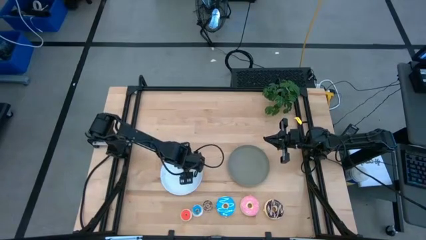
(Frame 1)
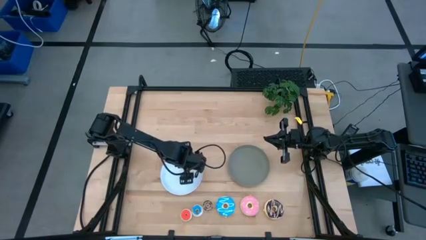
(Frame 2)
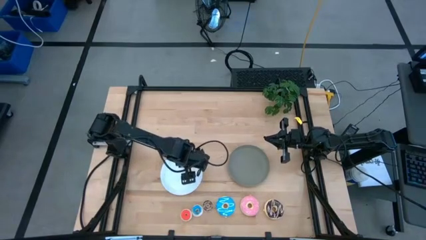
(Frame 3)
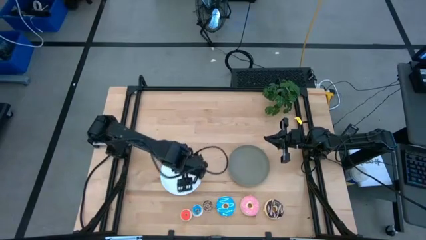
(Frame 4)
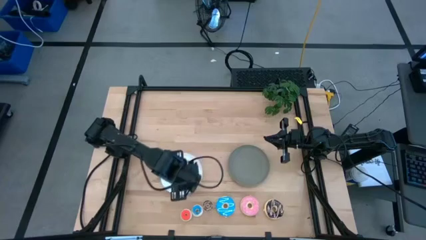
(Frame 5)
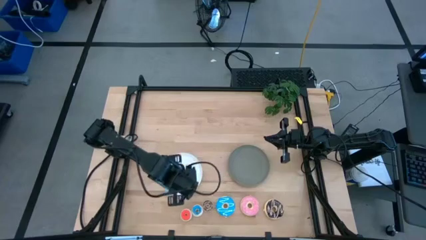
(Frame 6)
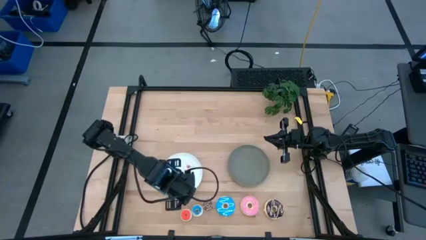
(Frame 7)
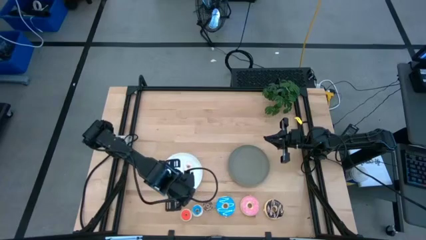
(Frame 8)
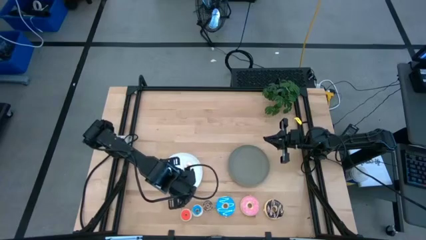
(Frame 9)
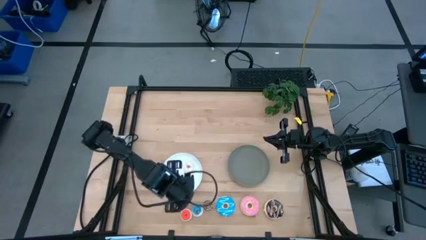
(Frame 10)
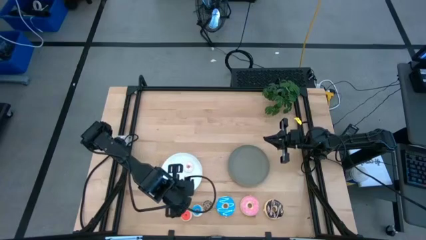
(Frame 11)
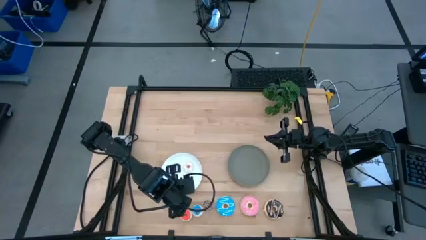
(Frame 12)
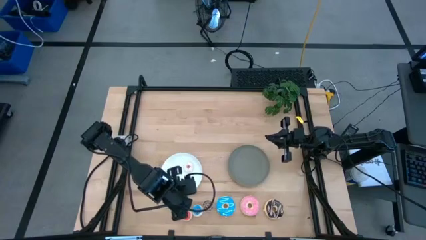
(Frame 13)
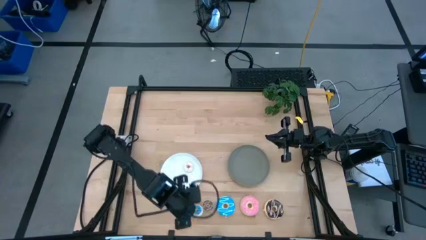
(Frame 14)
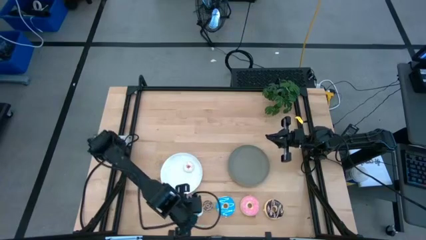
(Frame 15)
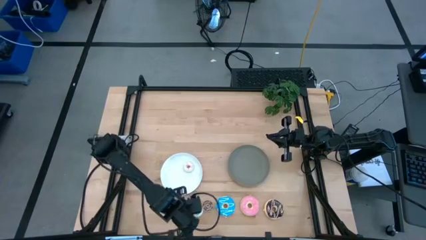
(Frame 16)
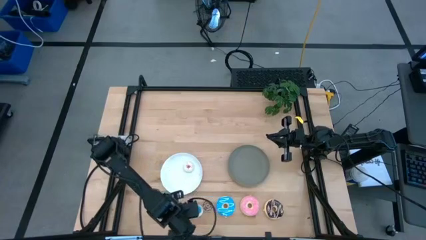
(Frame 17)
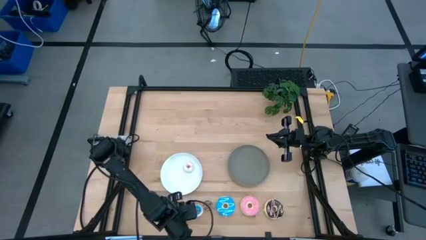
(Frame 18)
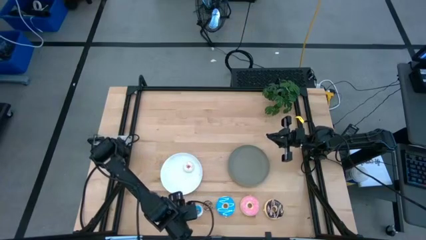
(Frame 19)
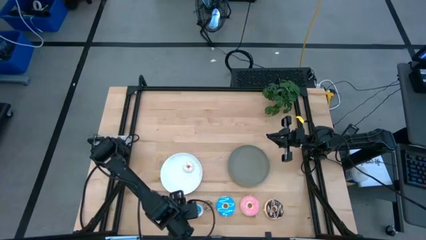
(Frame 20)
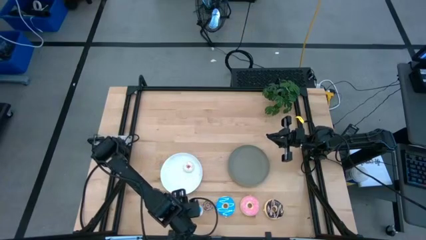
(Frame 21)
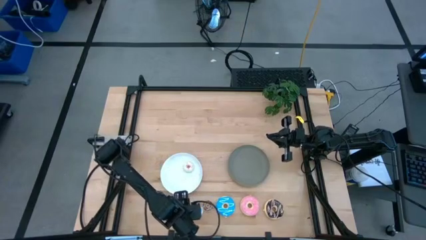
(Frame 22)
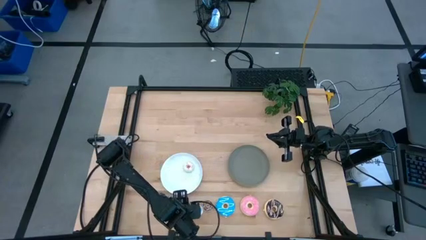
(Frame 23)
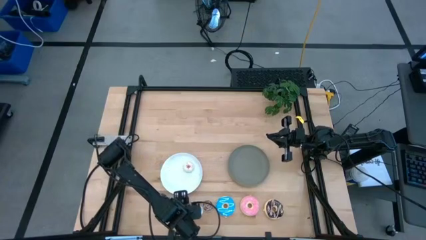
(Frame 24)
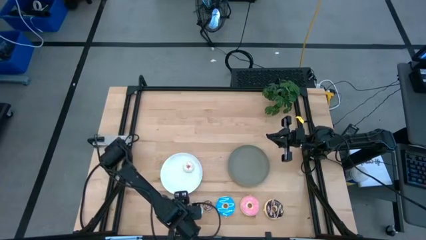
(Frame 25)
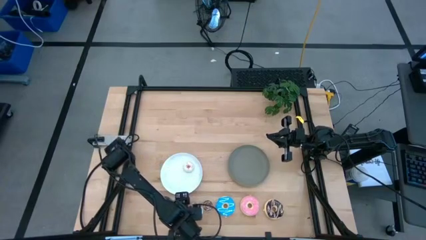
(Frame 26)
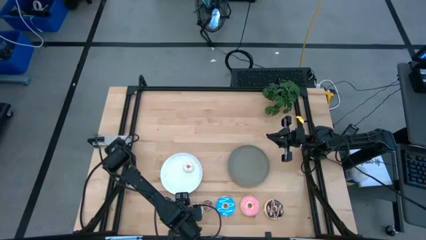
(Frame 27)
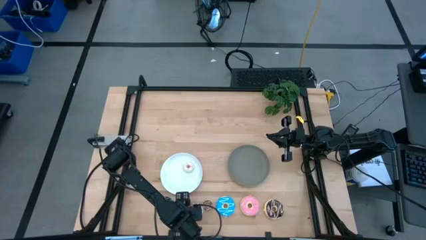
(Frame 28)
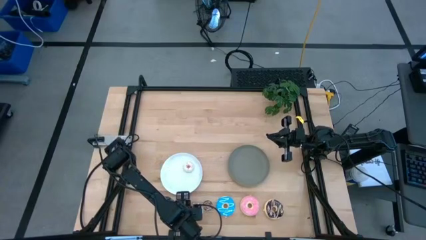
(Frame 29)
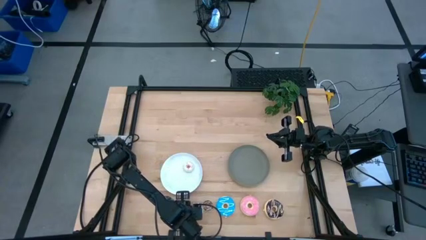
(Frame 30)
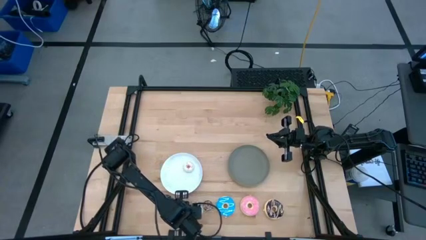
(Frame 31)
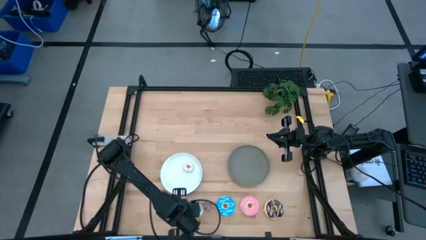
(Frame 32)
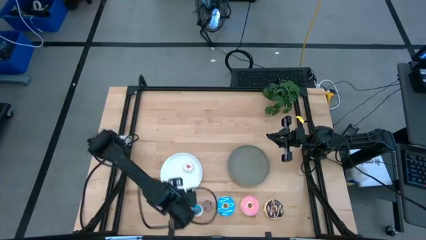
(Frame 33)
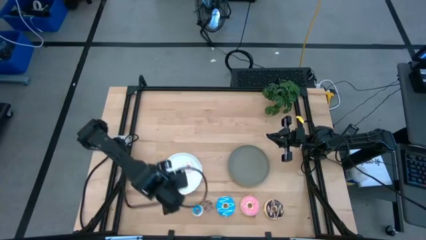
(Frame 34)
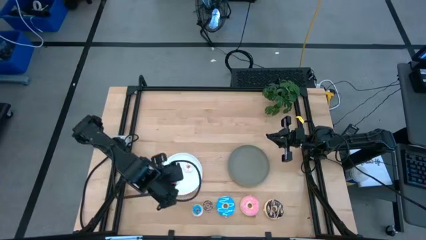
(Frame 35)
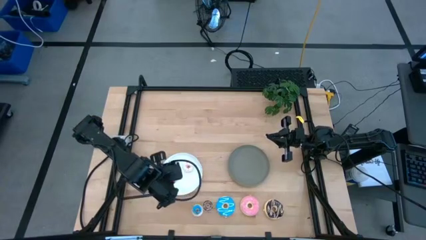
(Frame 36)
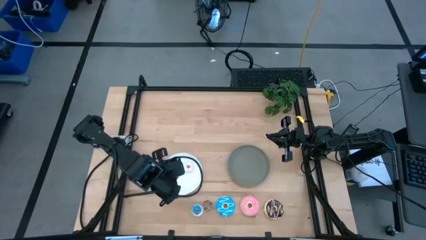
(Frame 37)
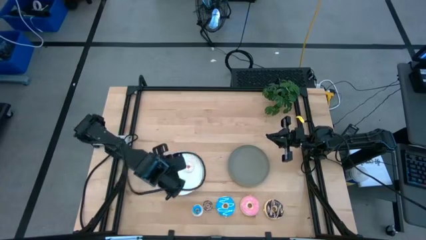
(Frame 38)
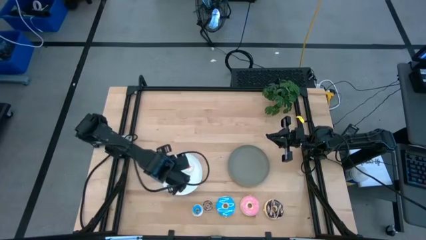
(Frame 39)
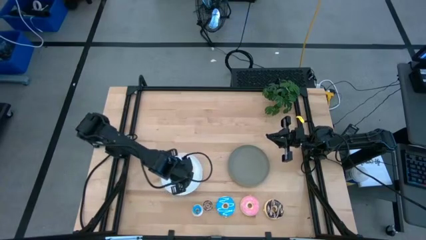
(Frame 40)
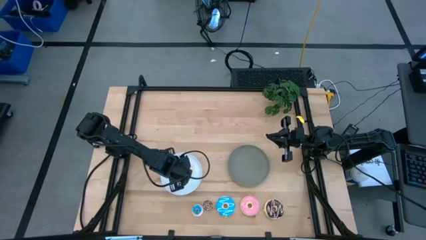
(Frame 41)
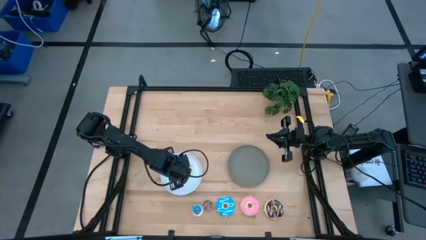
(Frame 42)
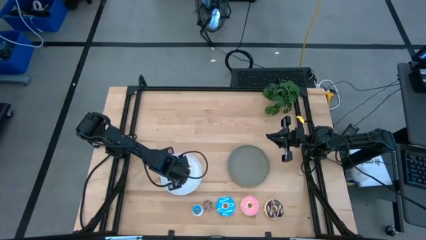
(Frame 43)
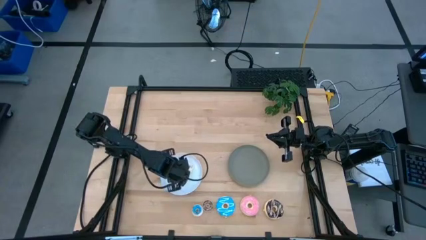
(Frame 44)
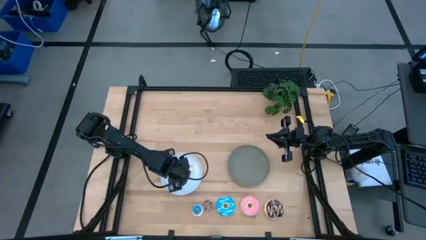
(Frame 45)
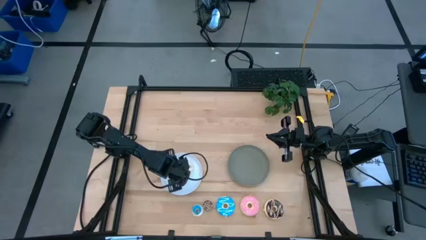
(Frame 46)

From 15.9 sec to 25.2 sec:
Task: Pick & Place donuts
Put the small orange donut on the white plate
